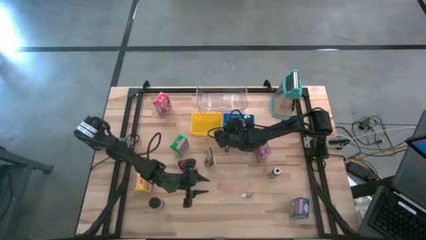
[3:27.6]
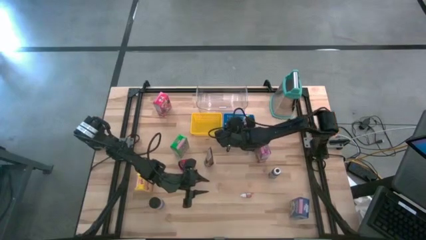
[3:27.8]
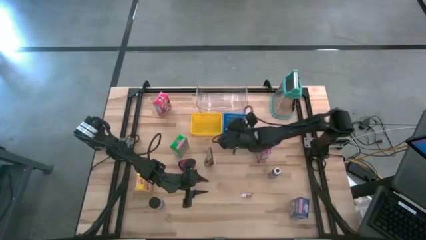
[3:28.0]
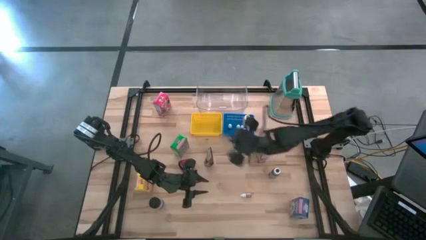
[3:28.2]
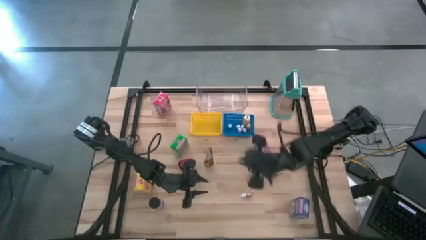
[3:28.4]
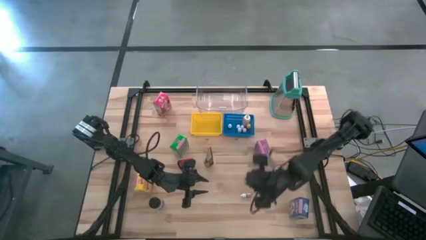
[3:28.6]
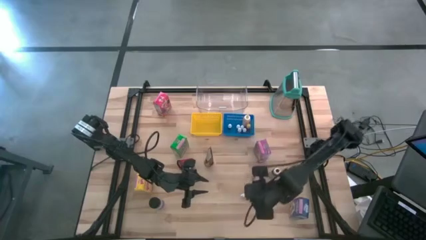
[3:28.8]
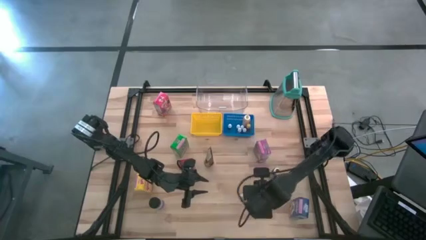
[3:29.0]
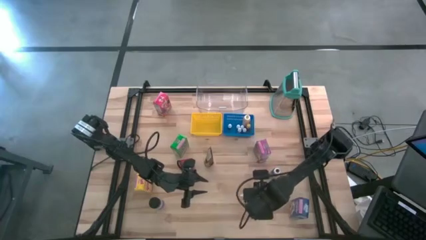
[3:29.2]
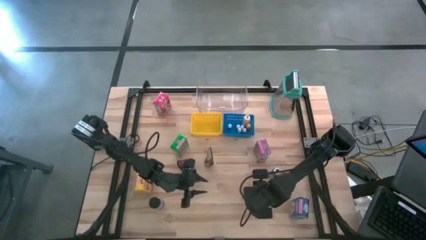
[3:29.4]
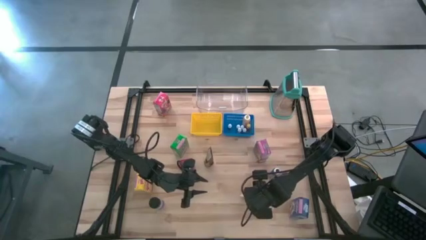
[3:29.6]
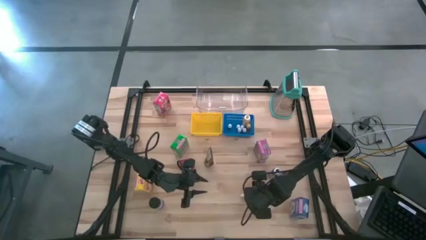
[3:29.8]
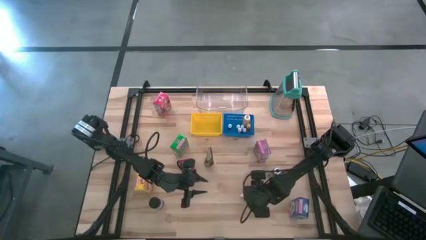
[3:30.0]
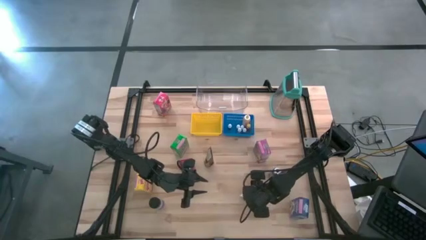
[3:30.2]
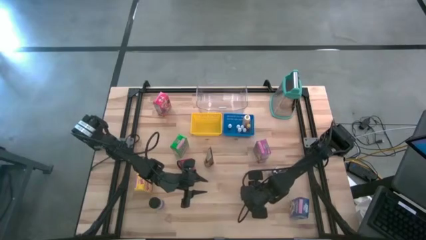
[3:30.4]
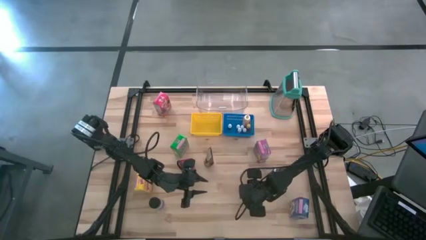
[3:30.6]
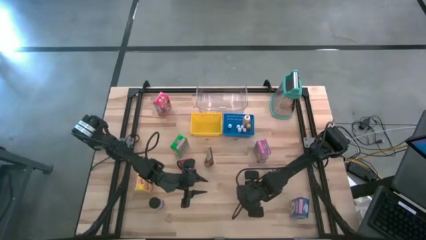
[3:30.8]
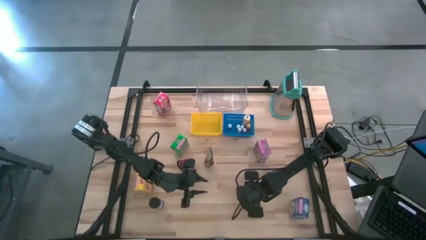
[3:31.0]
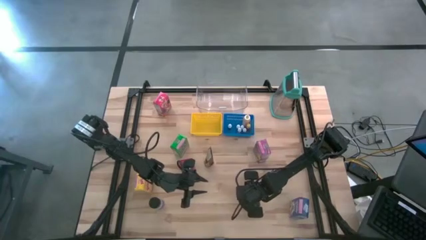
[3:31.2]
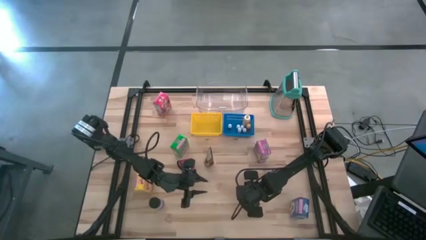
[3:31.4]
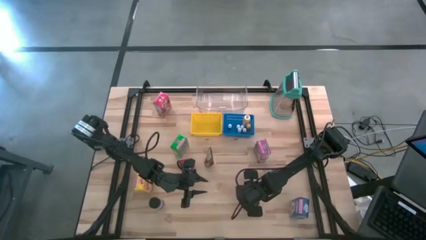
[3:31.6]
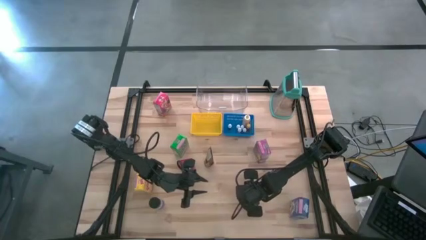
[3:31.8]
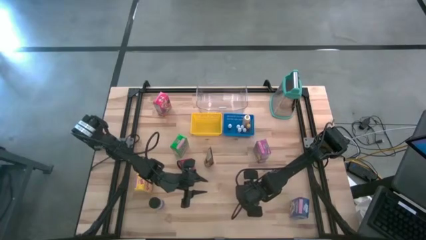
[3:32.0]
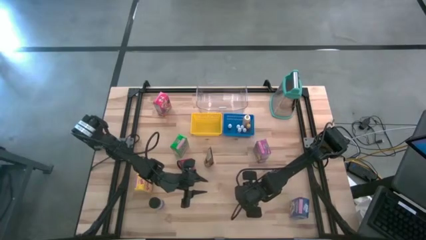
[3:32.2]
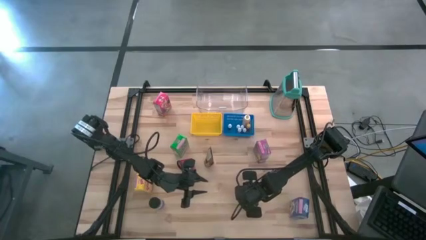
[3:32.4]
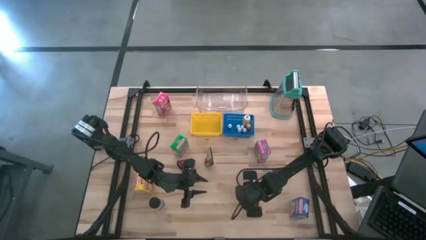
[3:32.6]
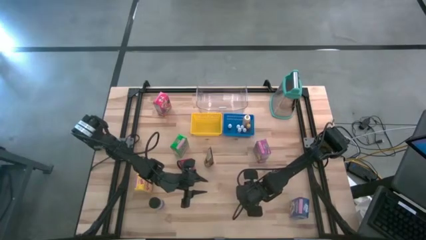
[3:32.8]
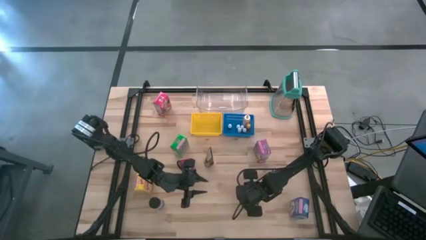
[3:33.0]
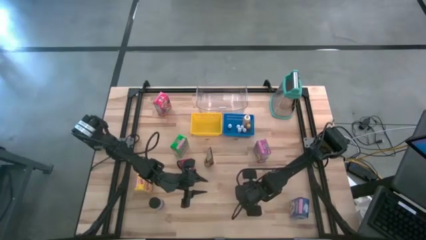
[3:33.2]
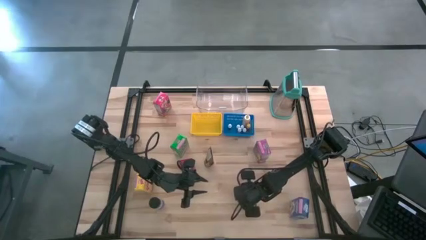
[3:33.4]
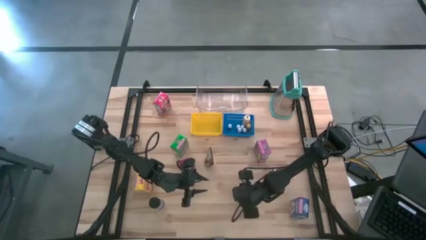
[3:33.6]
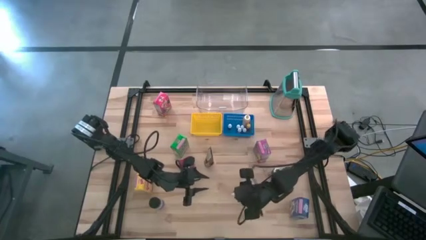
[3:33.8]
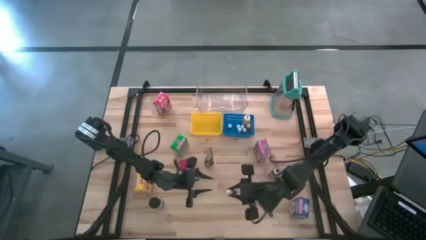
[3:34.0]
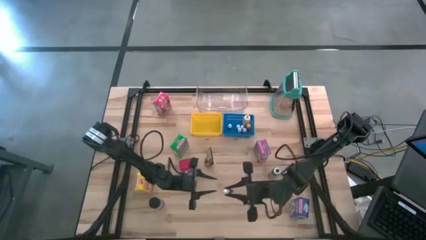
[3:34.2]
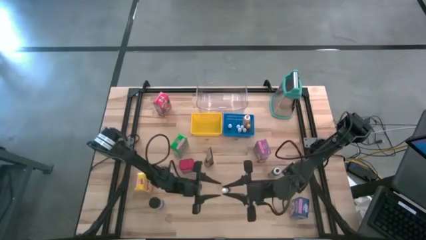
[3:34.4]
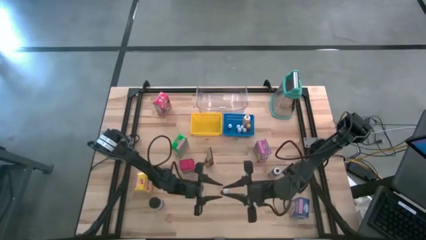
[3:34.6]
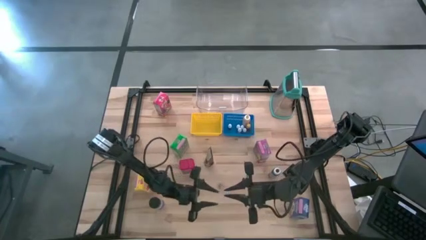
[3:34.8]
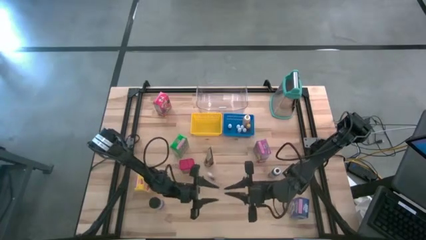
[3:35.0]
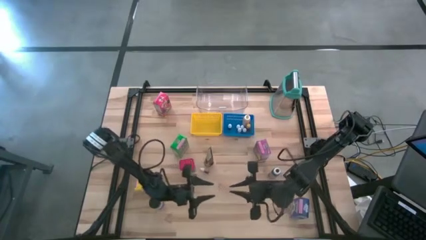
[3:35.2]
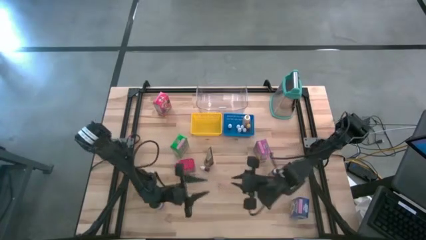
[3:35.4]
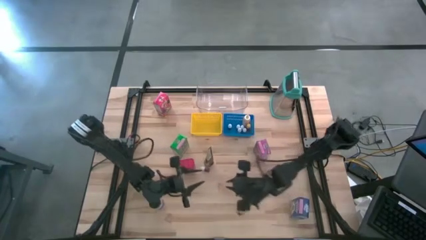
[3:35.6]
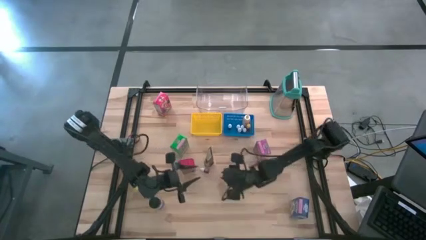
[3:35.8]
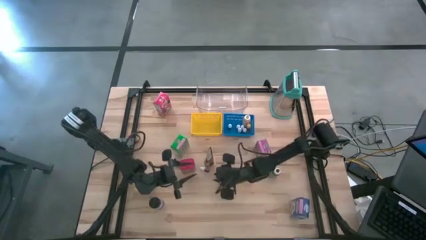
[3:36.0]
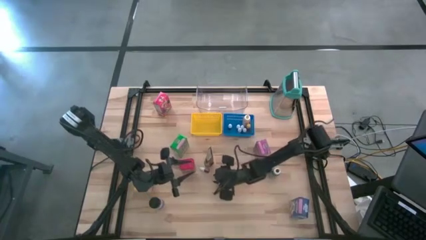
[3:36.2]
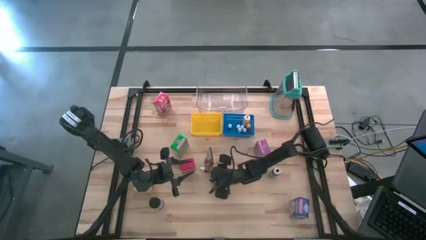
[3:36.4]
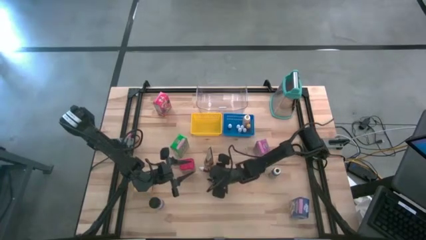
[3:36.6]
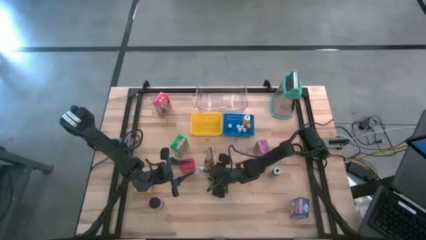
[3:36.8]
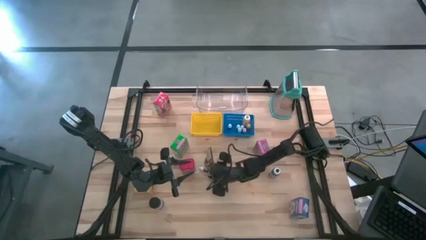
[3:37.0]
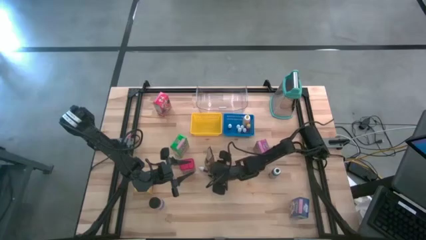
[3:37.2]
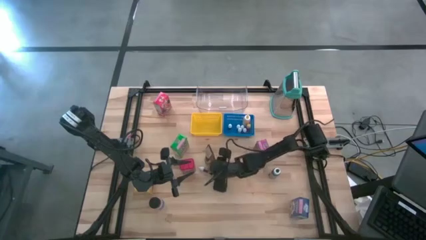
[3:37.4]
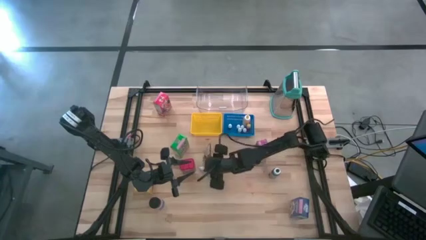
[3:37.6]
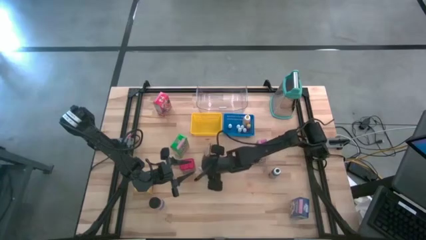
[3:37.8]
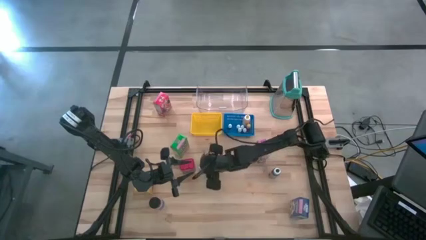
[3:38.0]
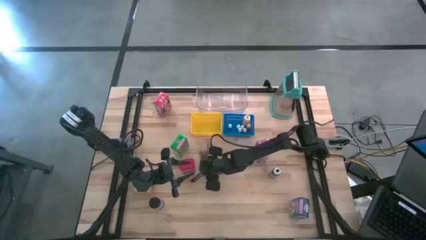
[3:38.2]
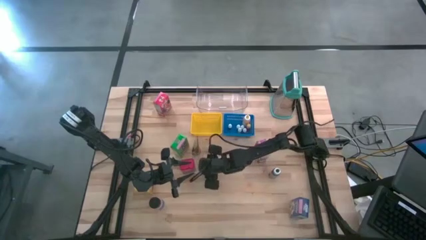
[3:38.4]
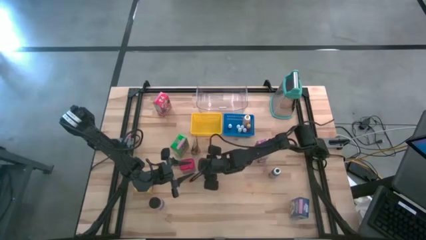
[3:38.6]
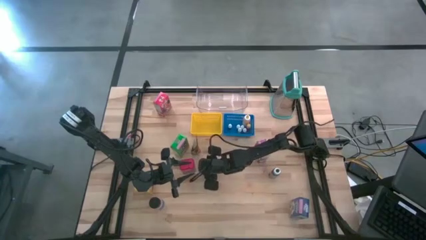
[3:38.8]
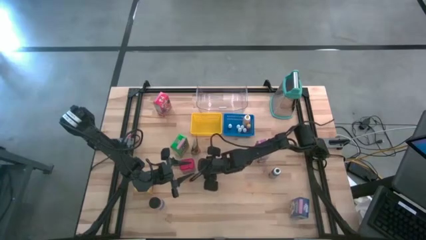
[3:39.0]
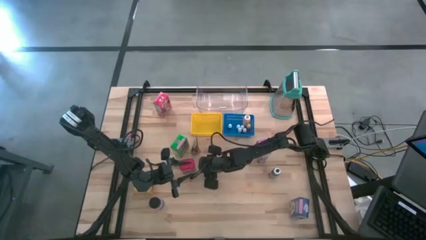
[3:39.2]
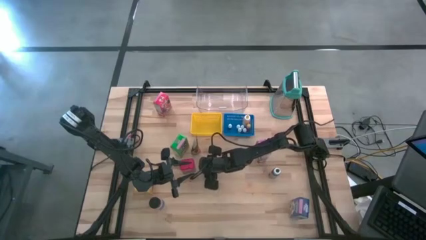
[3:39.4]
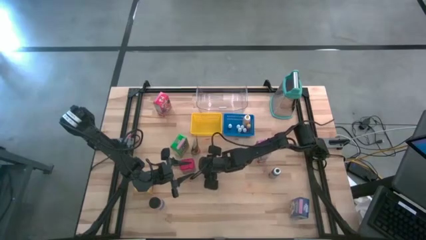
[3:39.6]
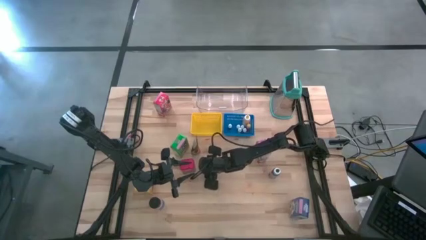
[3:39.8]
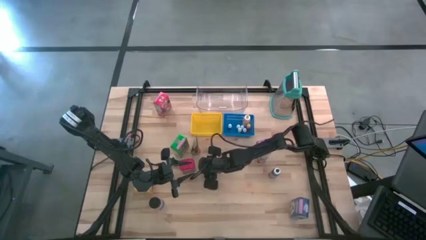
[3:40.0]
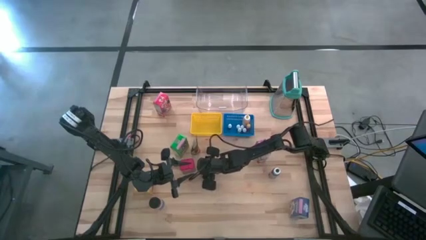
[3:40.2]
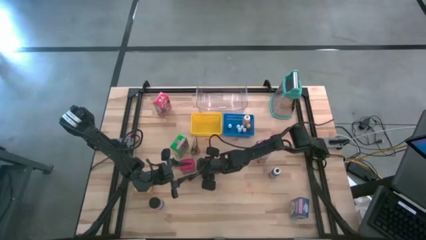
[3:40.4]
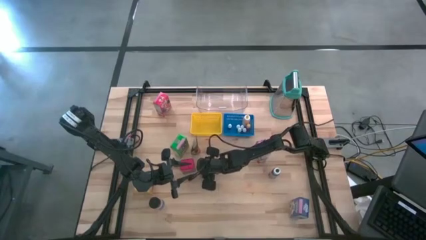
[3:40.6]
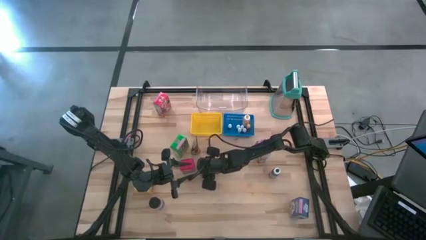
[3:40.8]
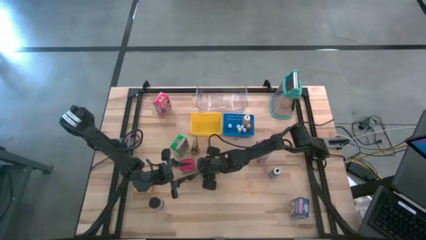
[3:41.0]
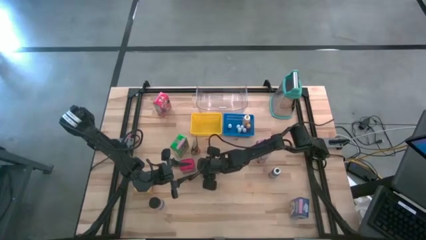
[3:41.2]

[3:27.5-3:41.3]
Task: Pick & Place Kitchen Items
Put the orange food coloring bottle into the blue bin
